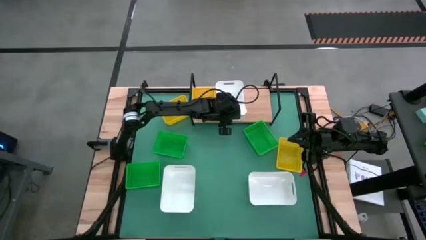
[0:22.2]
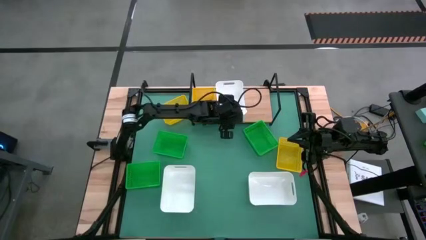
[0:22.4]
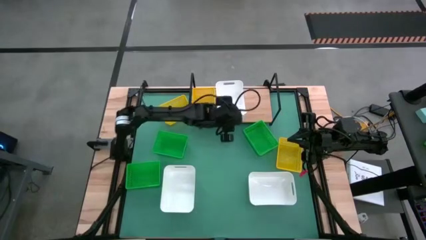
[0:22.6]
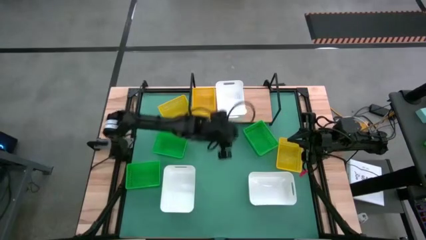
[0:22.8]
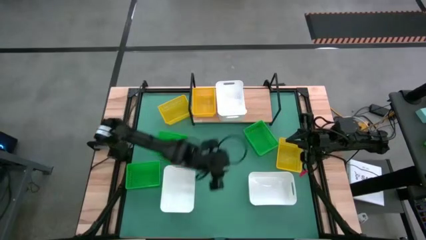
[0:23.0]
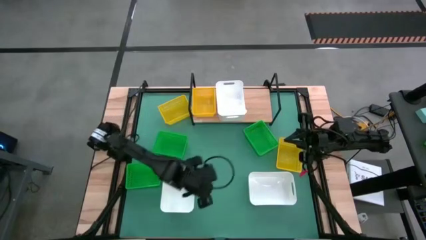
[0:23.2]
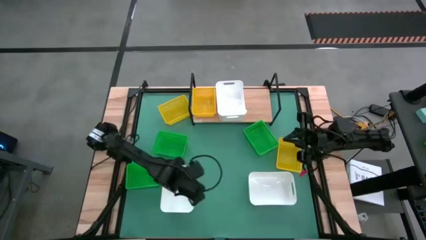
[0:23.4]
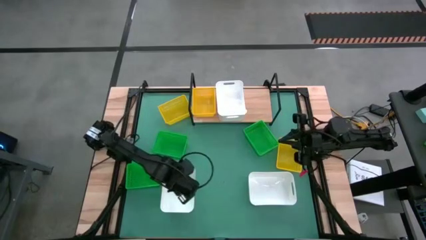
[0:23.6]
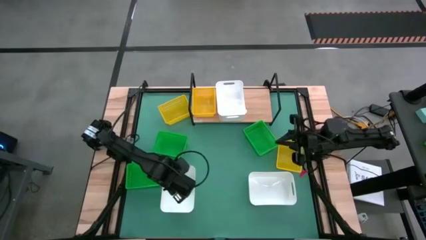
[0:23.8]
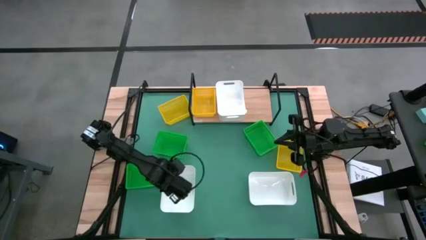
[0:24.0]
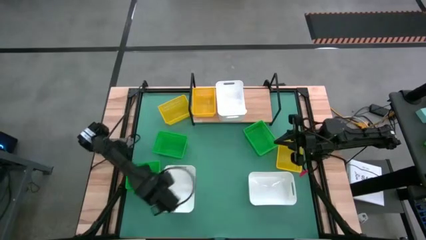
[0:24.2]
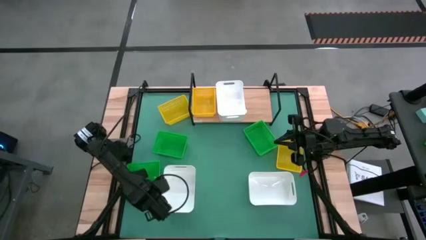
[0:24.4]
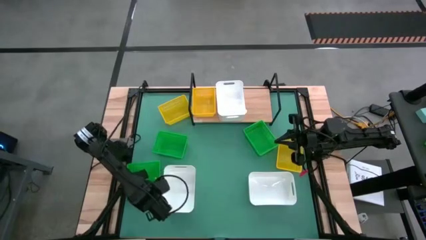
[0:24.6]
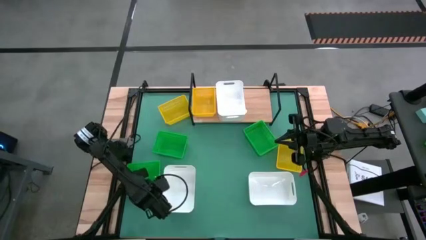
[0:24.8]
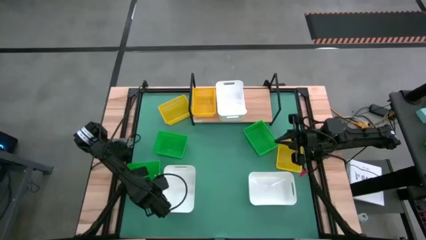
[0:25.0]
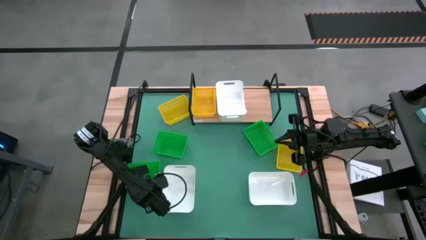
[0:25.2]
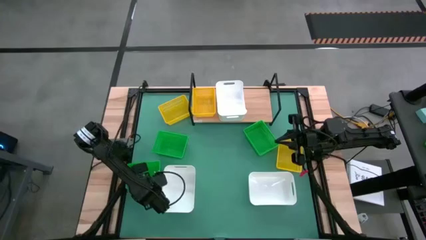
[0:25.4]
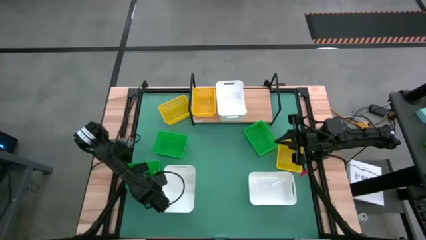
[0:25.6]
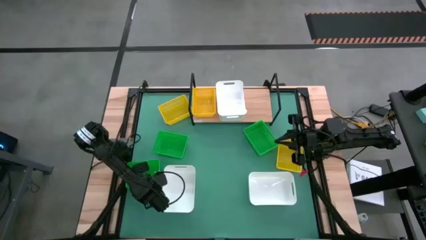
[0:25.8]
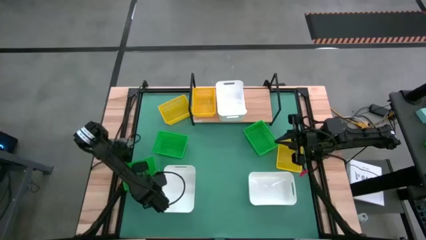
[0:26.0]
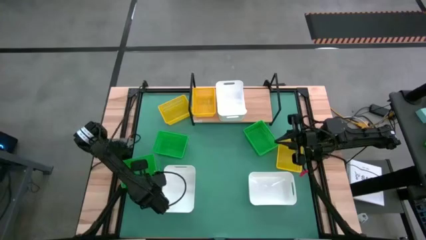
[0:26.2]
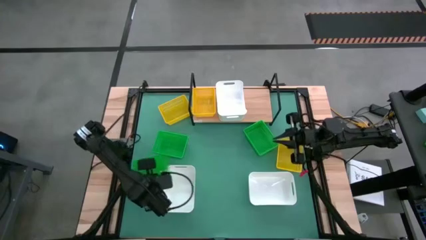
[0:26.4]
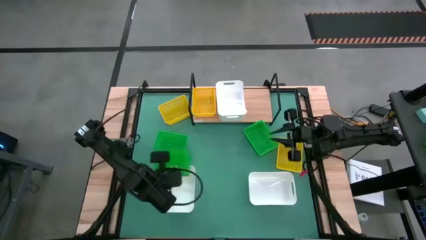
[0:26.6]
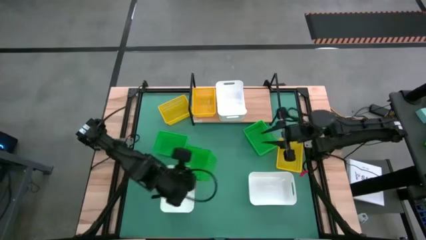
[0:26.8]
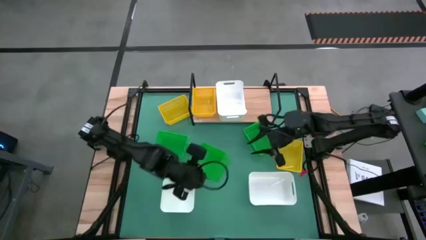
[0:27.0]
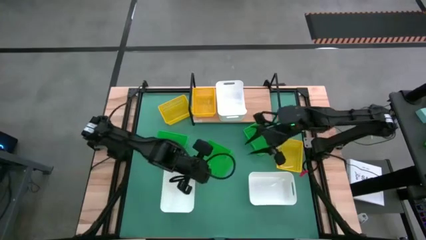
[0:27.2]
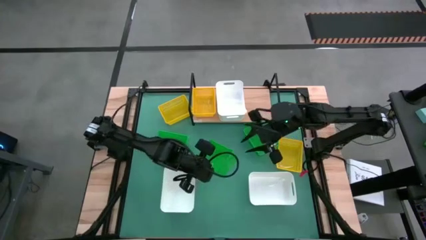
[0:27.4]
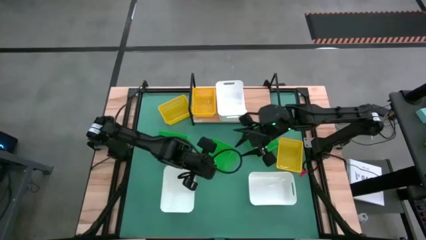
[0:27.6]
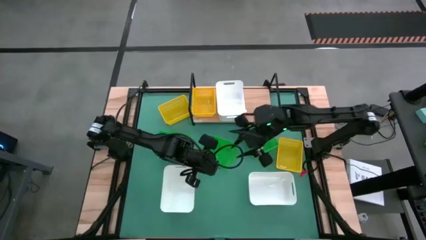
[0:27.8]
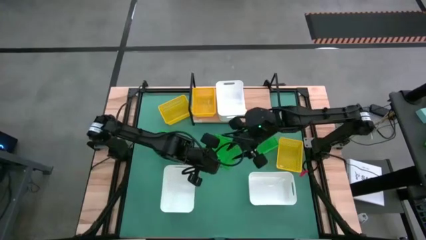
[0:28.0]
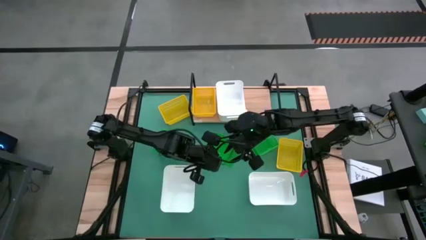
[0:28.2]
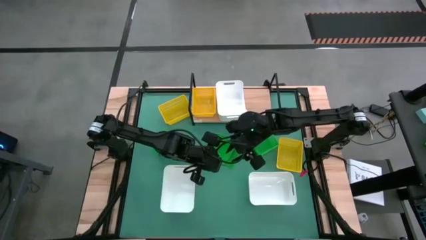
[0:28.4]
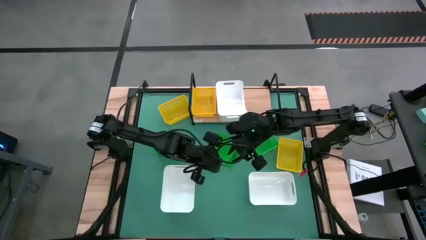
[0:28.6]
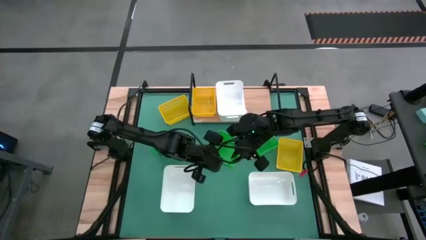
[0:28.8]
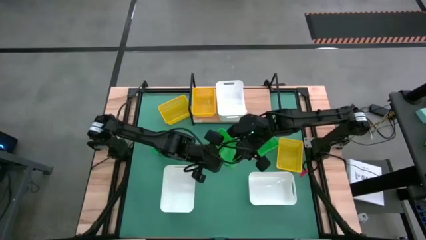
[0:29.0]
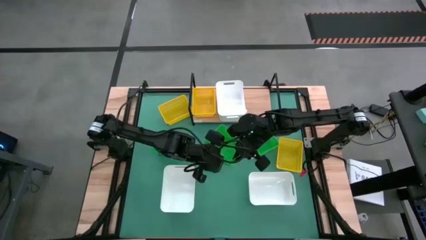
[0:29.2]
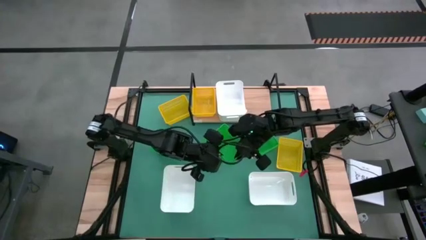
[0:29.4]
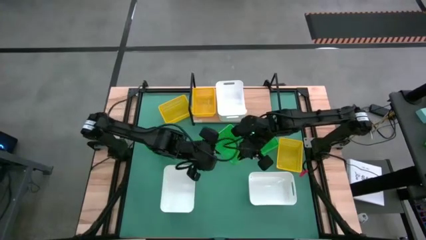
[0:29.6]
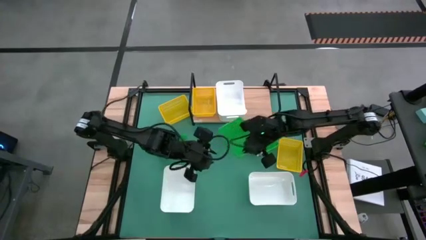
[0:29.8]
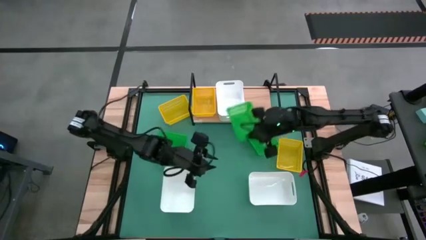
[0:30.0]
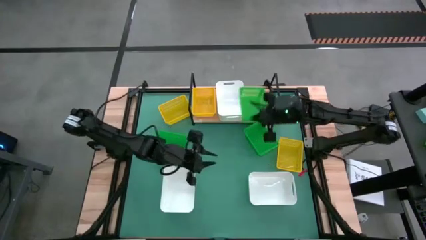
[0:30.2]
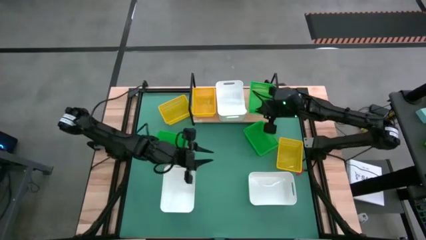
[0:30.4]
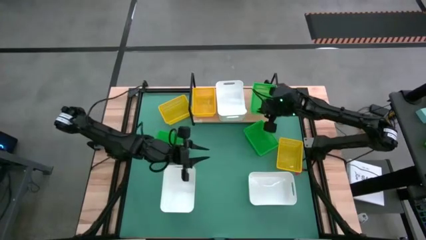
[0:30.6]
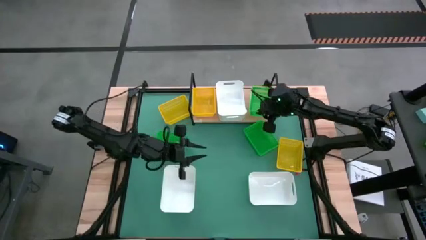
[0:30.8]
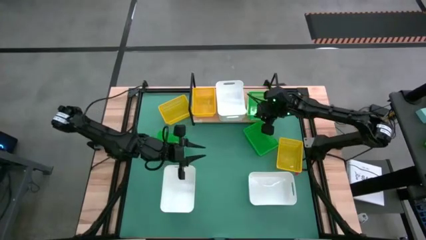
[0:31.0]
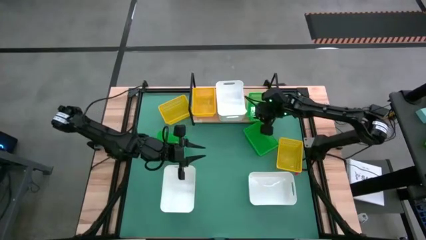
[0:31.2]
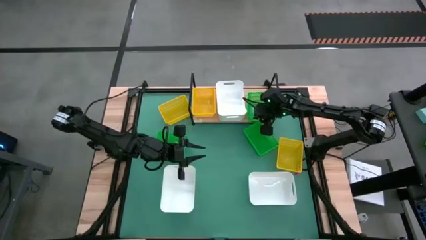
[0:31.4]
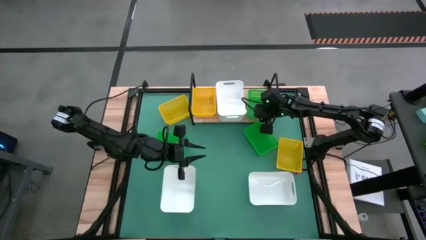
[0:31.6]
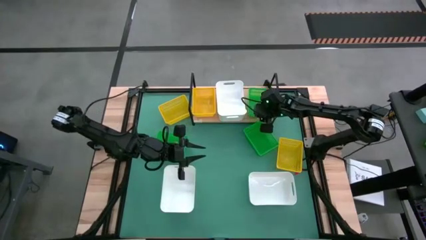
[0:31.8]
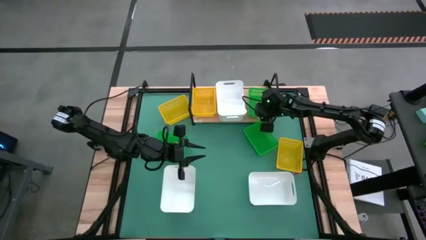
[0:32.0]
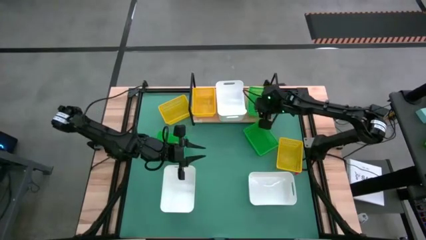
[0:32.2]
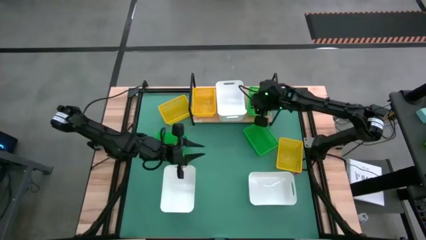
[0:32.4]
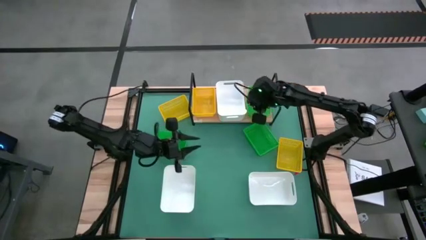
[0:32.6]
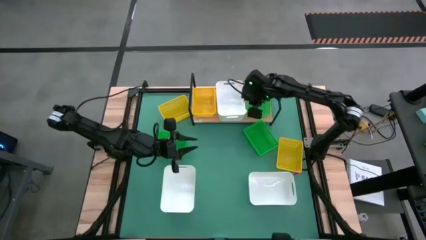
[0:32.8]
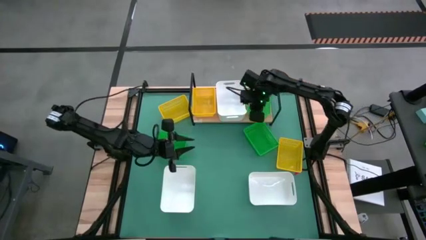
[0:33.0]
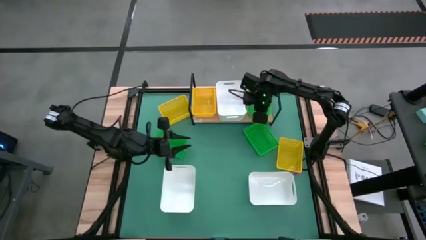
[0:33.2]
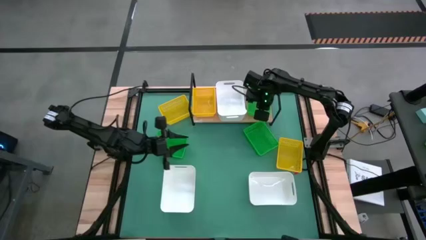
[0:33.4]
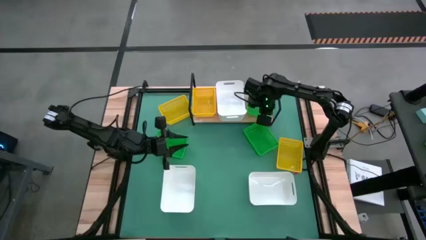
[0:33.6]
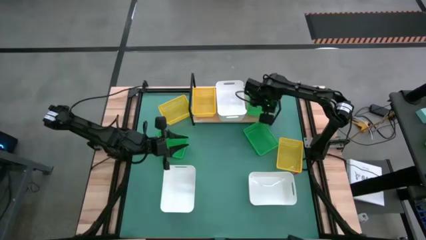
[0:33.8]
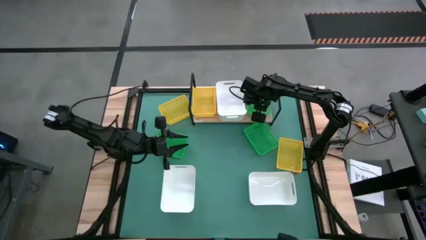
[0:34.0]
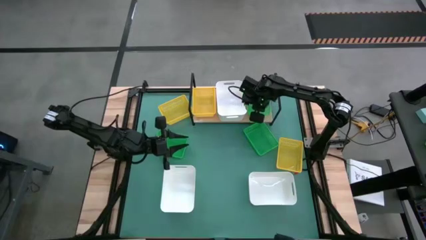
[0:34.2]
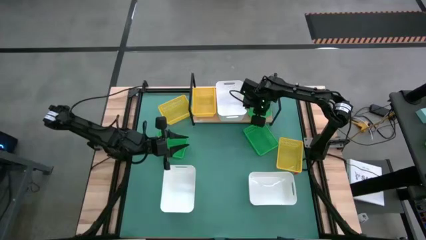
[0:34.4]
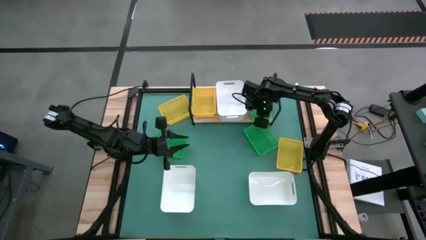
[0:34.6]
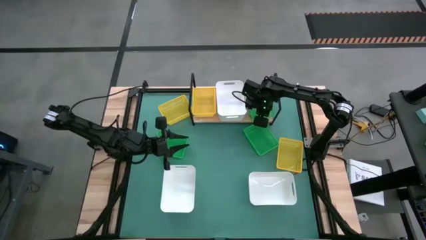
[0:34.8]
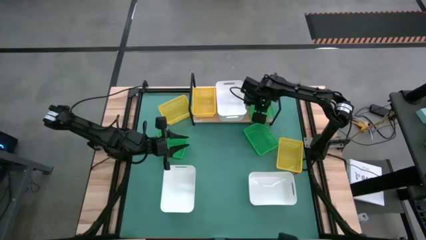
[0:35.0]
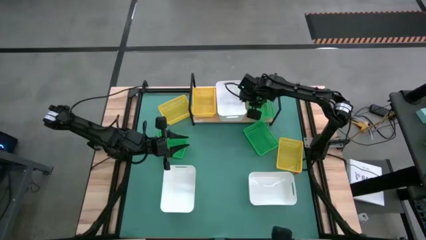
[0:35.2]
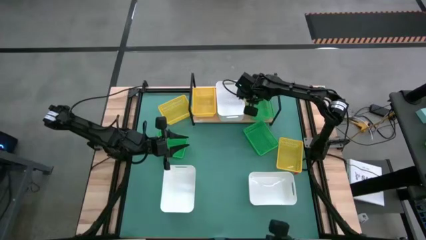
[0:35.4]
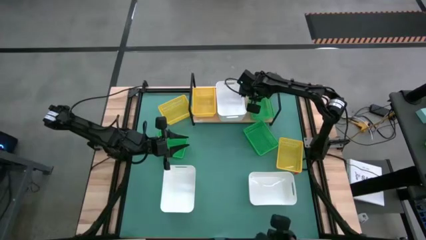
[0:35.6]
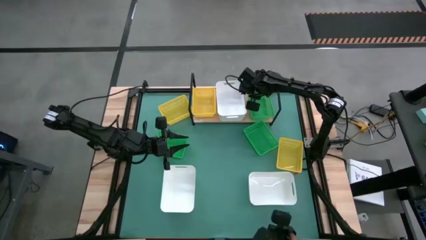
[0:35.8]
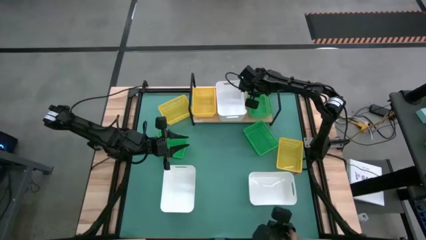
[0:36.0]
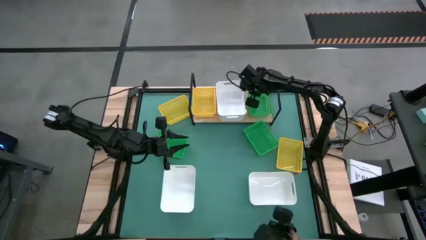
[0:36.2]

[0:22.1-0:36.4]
Task: Stack baskets on shelf by color
Put the bottom green bin on the shelf

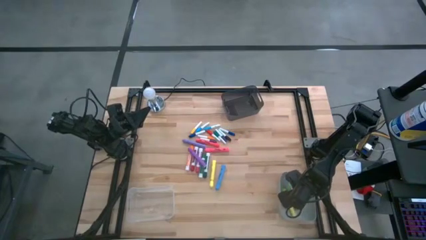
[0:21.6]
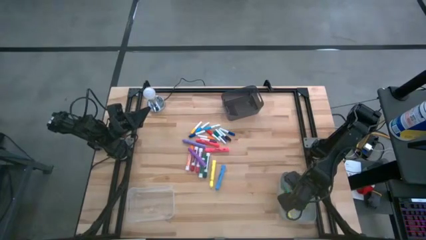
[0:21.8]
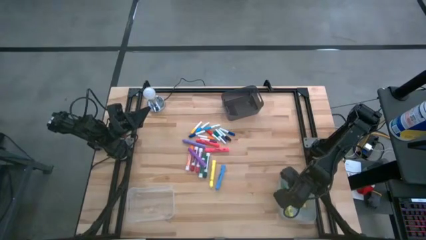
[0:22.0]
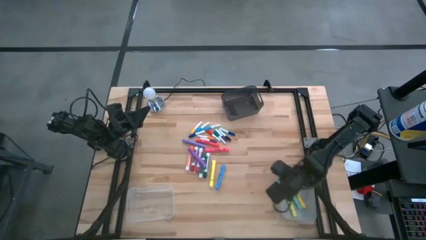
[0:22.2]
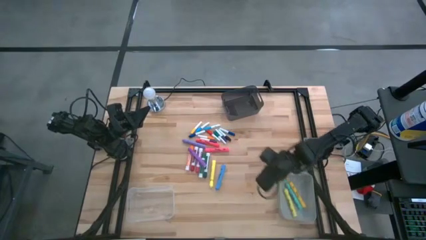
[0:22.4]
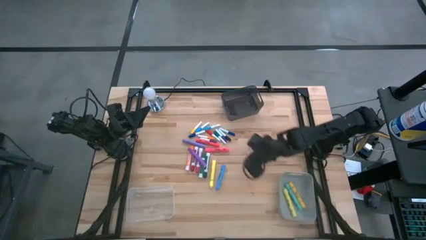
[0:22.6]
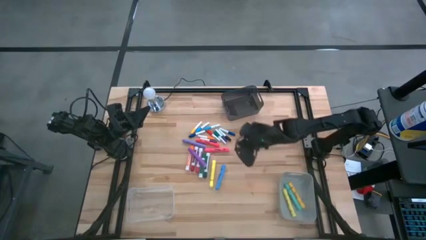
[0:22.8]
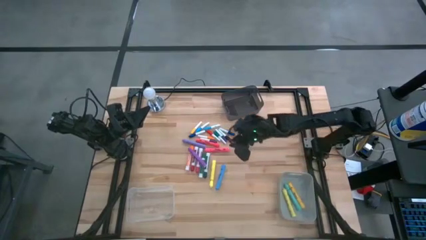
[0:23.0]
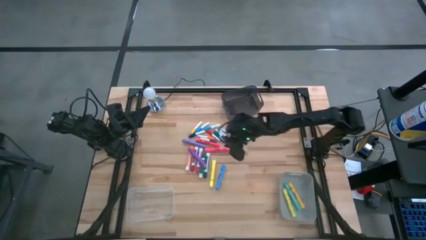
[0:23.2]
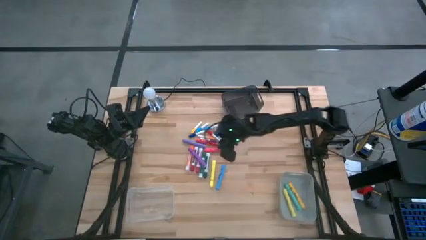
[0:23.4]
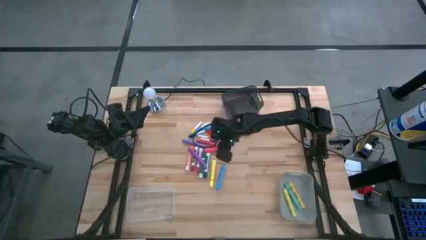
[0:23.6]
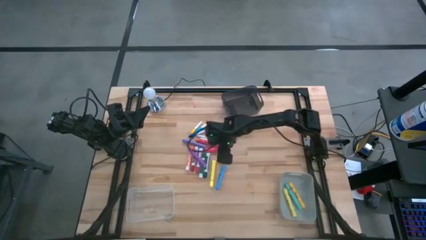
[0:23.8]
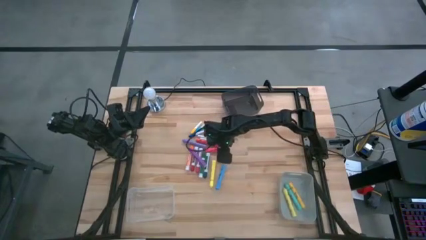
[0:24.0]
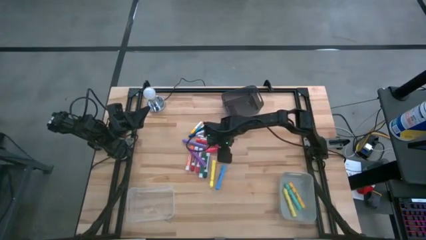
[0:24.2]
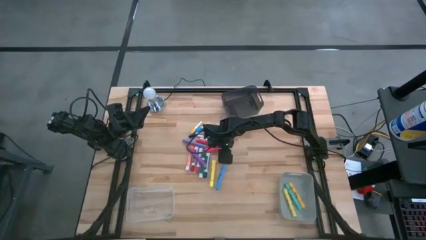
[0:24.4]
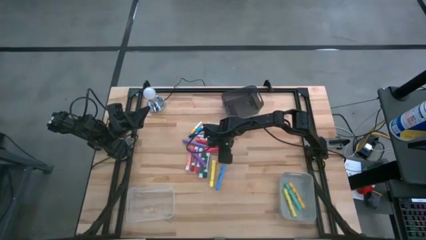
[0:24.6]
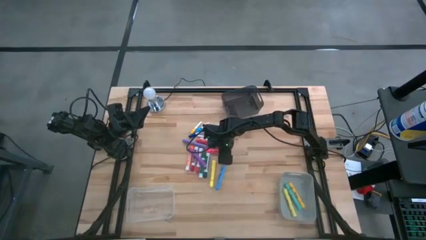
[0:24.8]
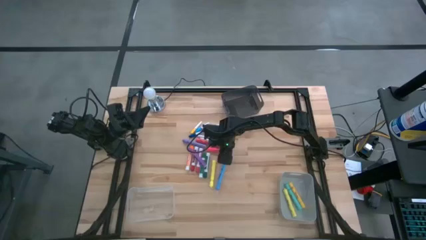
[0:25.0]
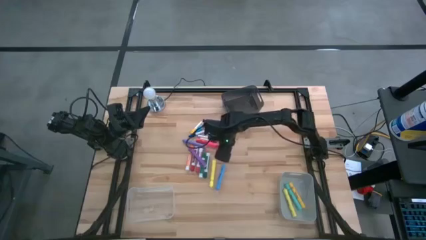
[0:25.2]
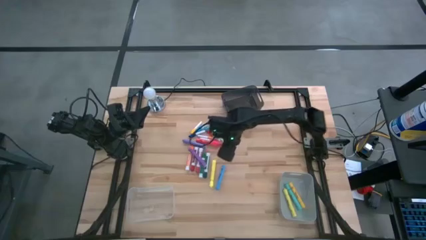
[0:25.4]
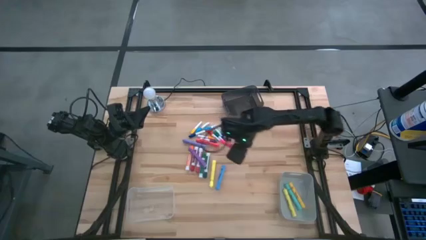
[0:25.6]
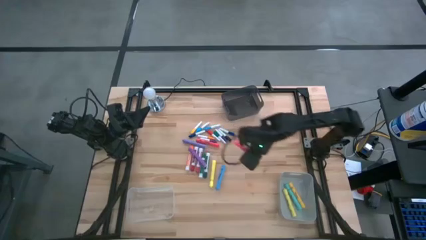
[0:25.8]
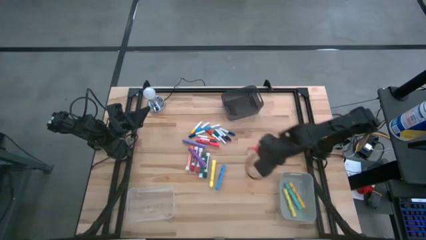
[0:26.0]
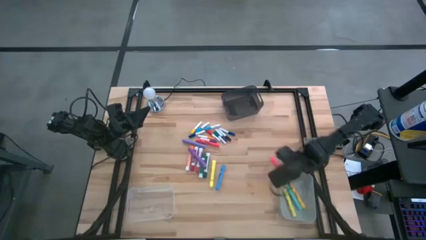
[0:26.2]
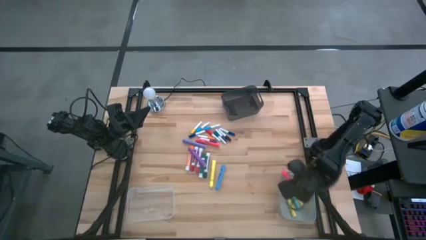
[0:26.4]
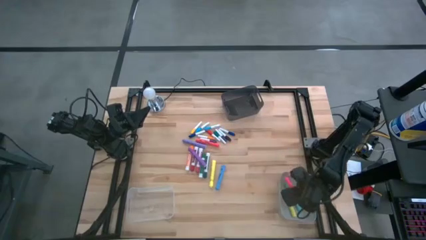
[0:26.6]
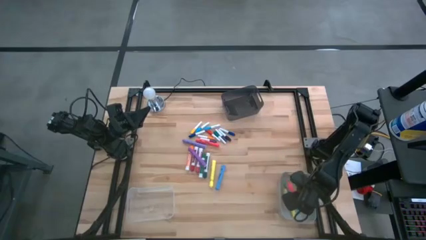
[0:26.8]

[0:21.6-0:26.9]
Task: Pick & Place Markers
Put the pink highlighter pen into the gray bin
